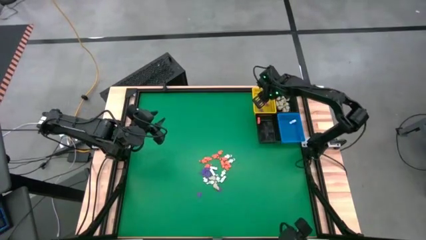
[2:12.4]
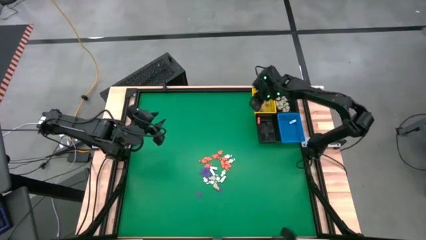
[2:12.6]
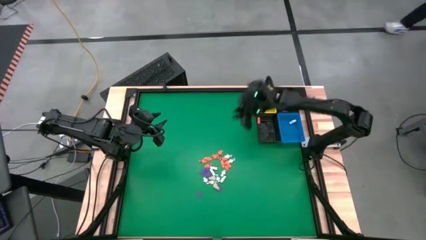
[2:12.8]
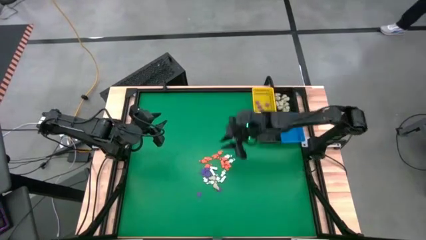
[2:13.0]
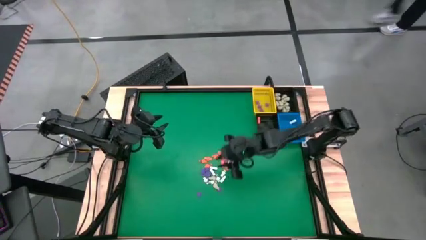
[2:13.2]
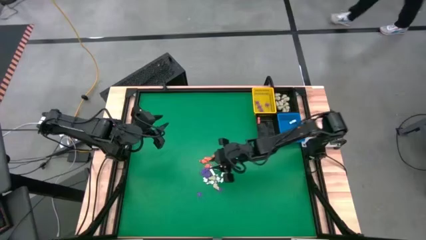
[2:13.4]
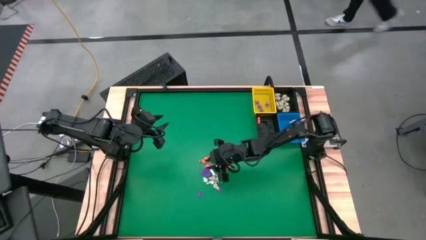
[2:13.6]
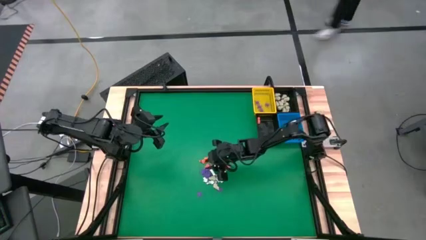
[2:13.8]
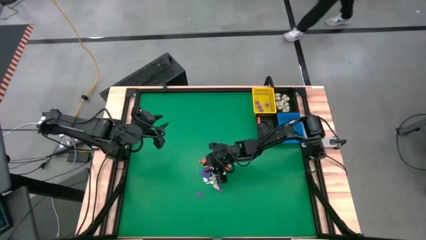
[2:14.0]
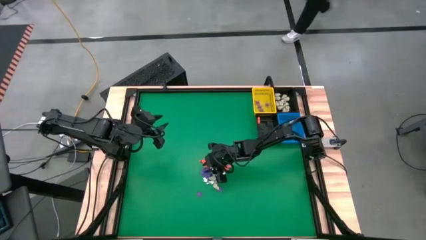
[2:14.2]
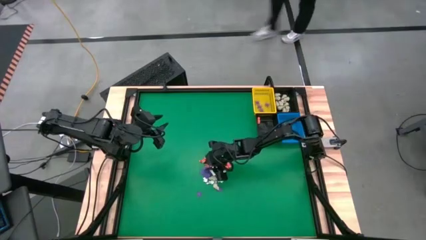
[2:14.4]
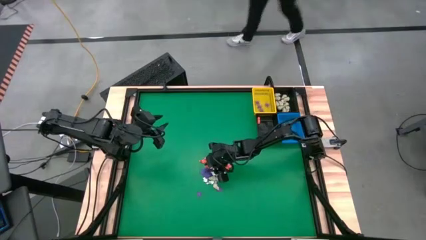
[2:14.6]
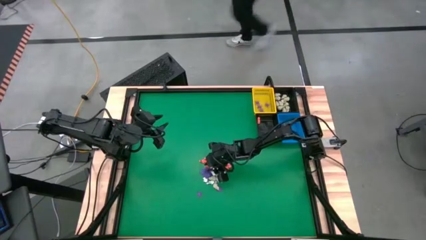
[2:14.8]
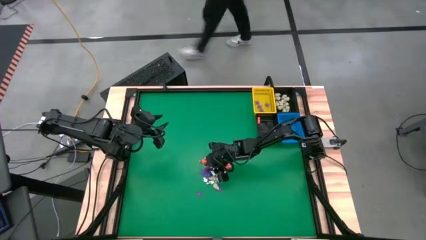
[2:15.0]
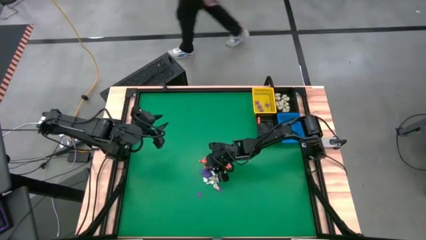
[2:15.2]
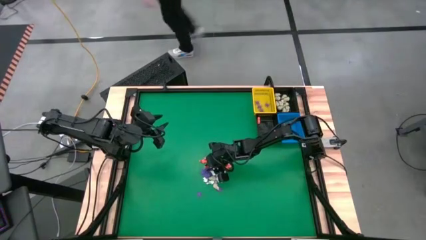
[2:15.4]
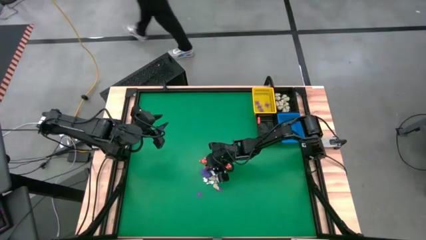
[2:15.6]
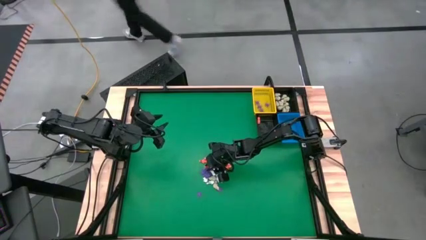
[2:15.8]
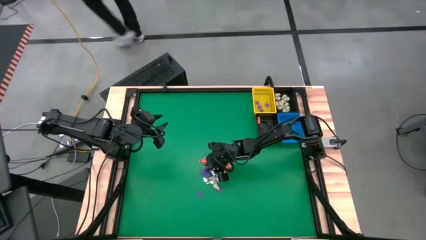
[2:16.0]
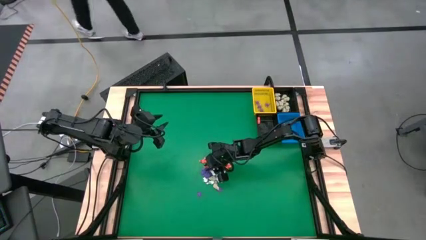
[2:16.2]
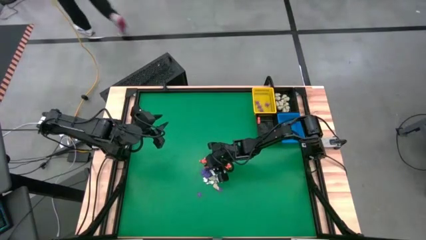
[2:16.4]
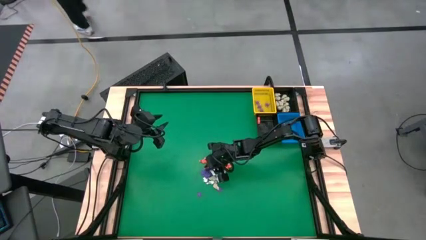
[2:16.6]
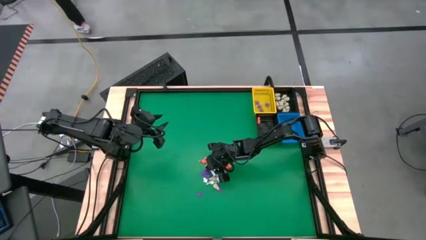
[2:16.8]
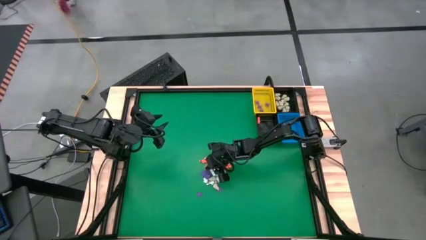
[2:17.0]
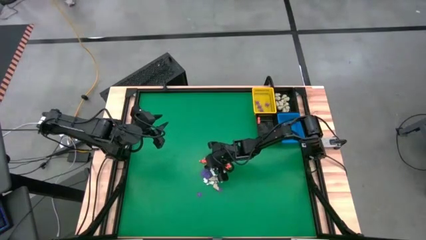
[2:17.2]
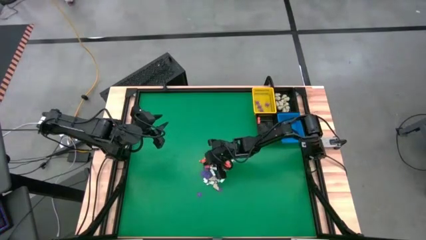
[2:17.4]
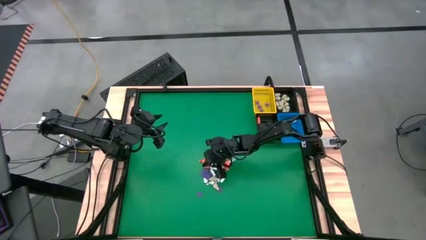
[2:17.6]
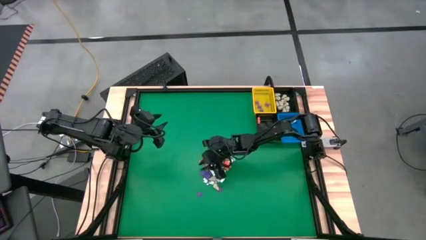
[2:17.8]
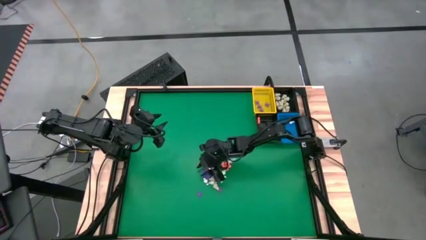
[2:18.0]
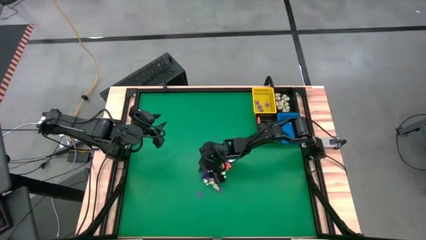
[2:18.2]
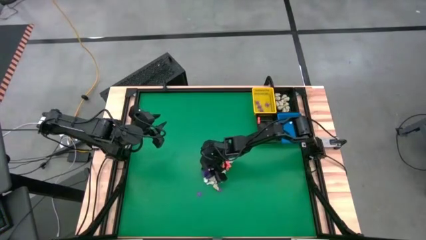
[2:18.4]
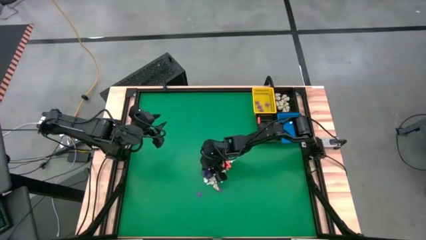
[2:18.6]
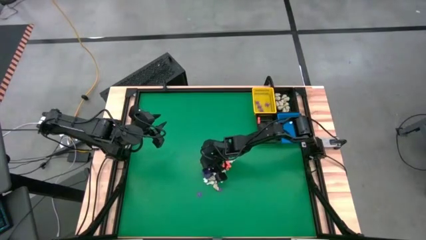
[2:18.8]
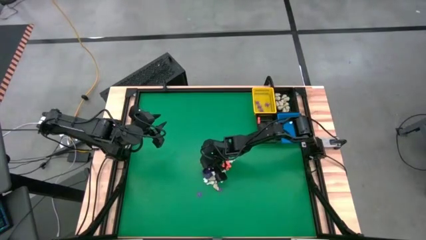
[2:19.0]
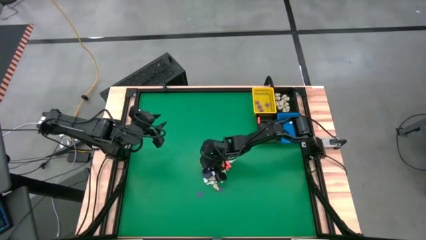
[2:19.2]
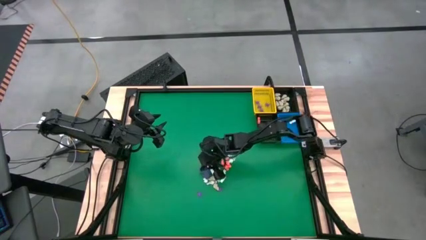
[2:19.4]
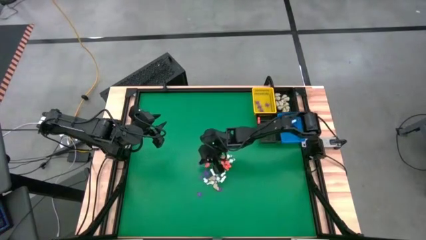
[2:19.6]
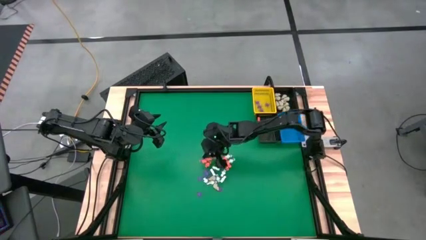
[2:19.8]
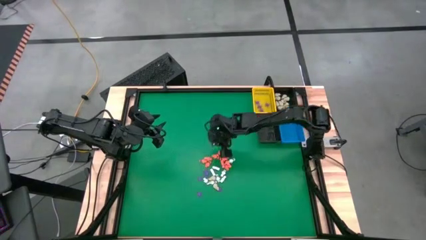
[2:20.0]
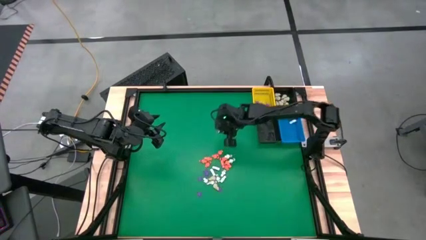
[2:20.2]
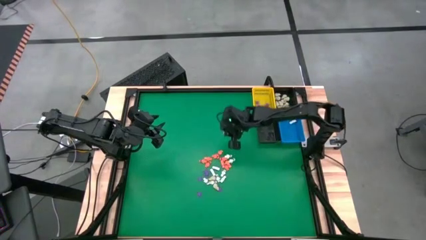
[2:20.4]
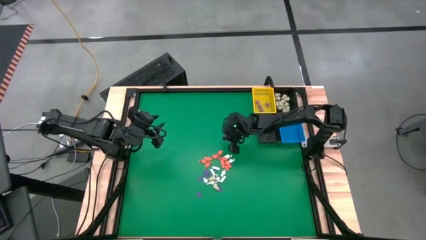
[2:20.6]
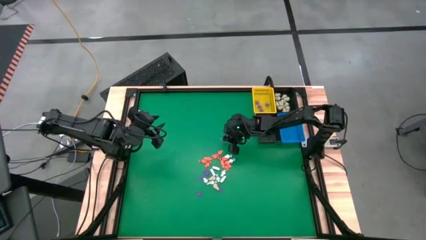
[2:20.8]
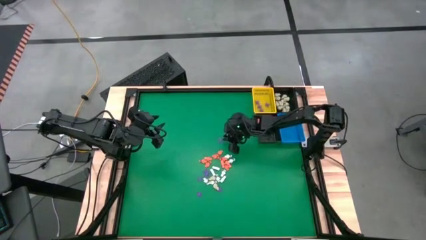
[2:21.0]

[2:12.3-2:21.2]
Task: Sort Halloween decoration
Put the purple spider toy into the yellow basket

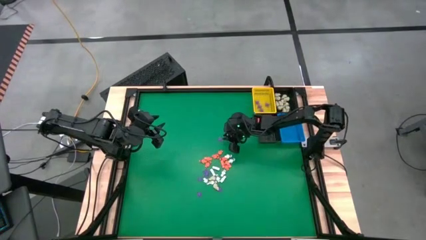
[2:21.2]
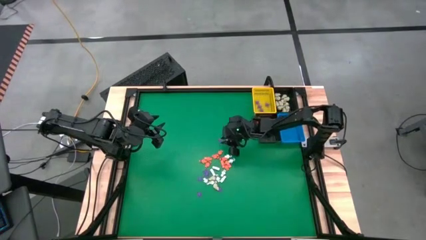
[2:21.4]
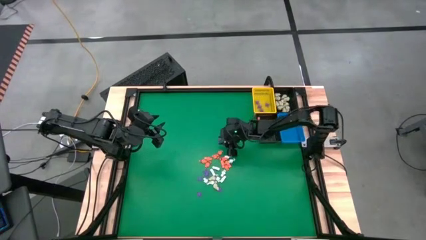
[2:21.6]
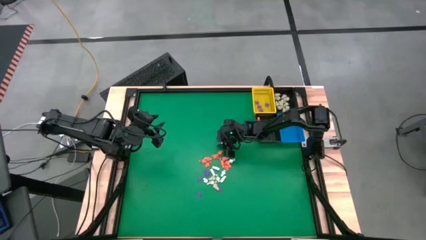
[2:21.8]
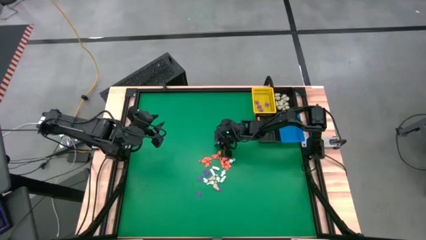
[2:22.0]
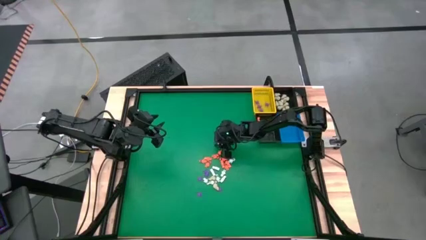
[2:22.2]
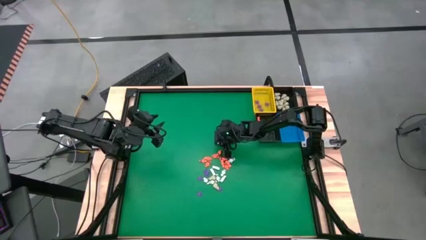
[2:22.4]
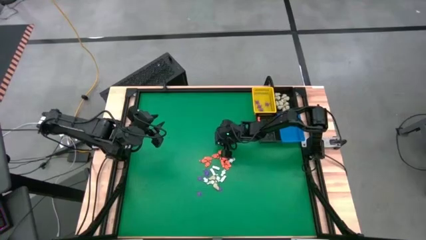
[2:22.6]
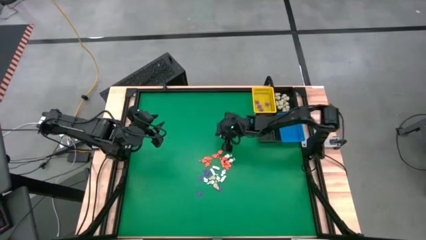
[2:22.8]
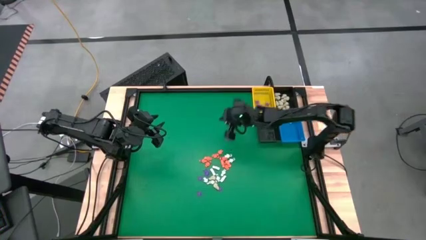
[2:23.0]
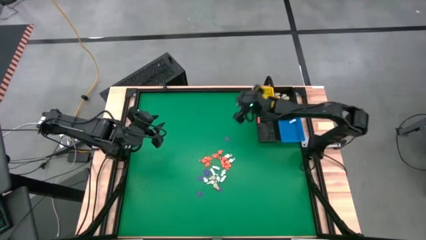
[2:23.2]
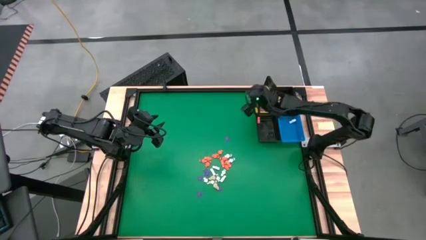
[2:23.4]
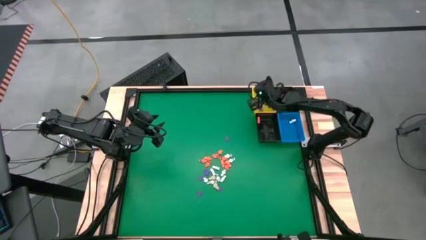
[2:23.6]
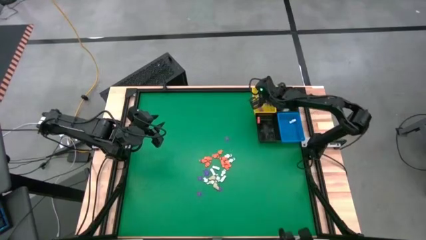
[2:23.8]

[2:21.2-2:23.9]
Put the purple spider toy into the yellow basket

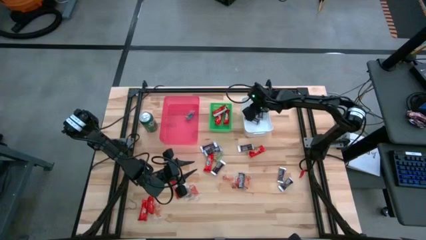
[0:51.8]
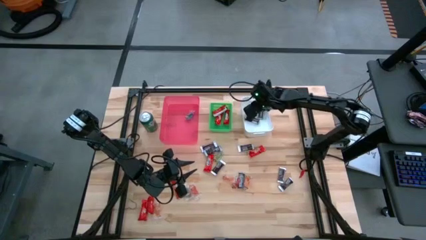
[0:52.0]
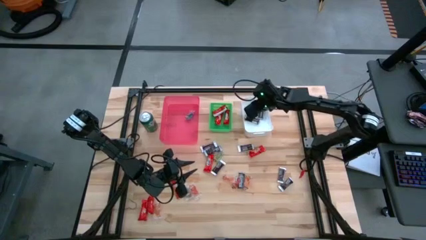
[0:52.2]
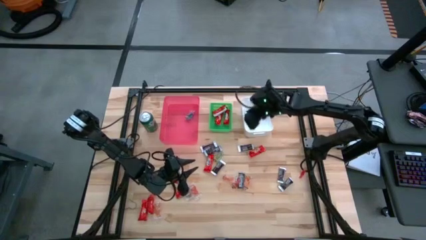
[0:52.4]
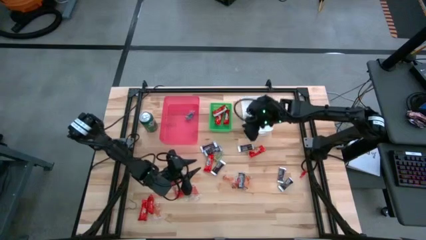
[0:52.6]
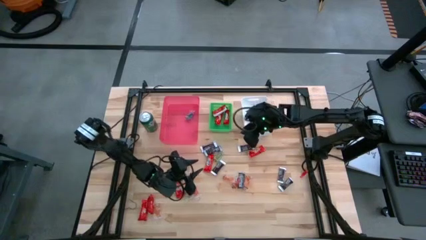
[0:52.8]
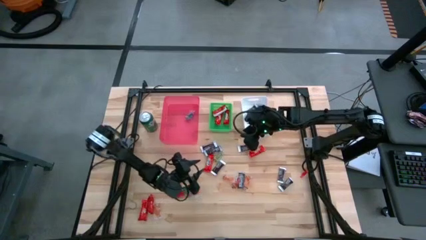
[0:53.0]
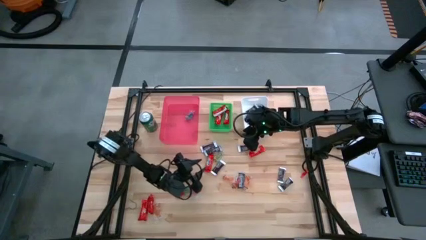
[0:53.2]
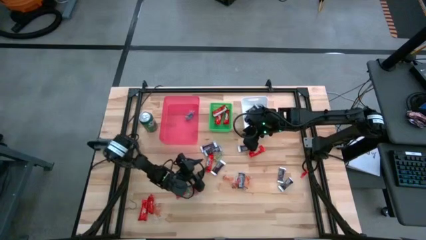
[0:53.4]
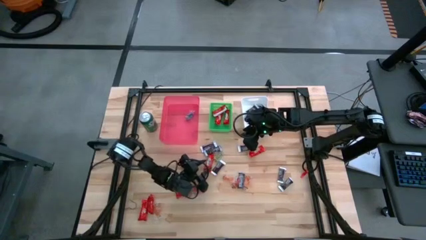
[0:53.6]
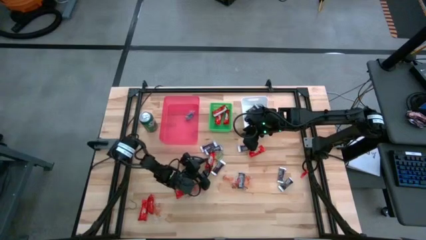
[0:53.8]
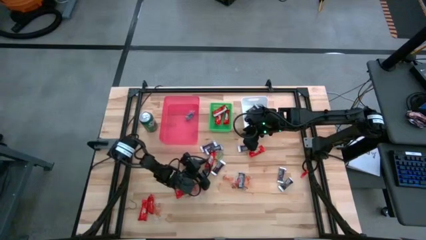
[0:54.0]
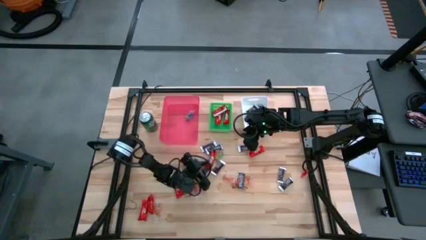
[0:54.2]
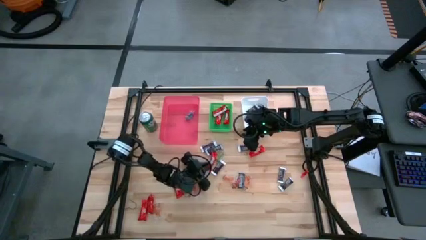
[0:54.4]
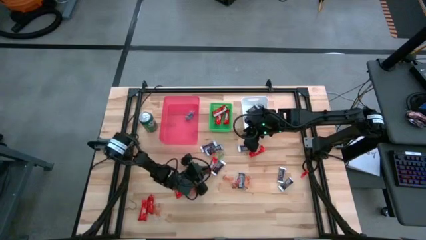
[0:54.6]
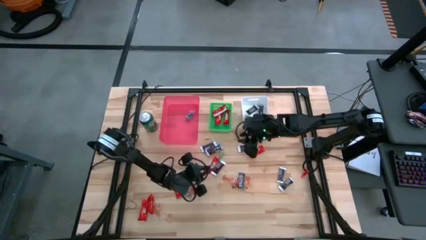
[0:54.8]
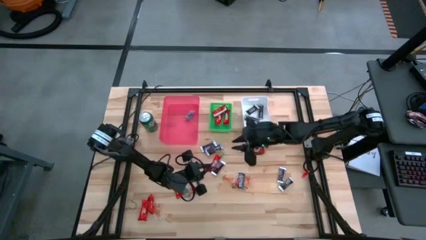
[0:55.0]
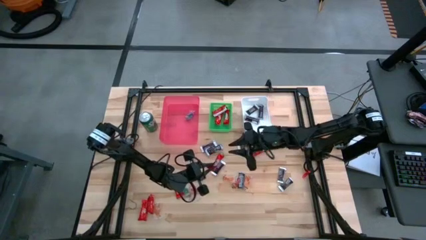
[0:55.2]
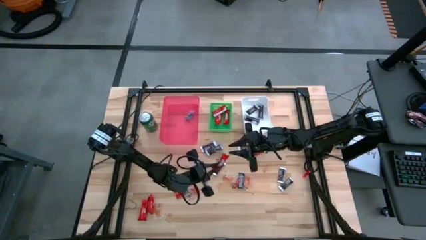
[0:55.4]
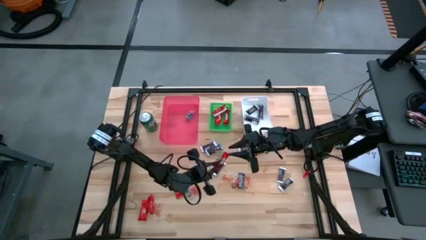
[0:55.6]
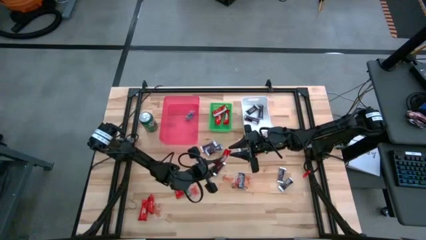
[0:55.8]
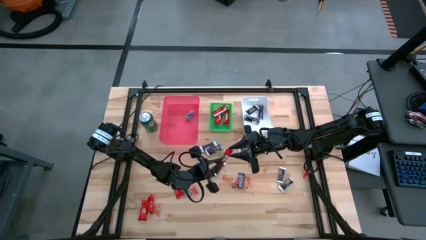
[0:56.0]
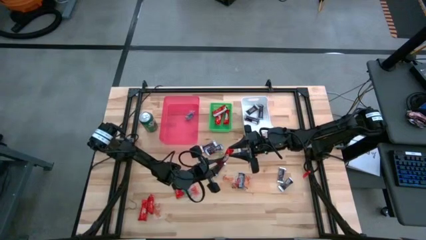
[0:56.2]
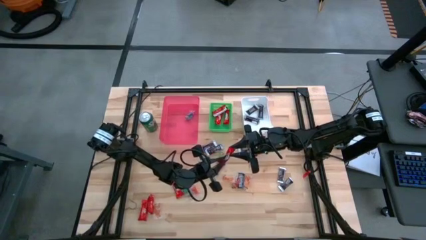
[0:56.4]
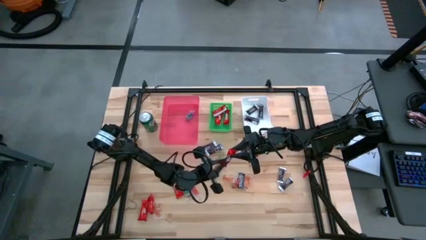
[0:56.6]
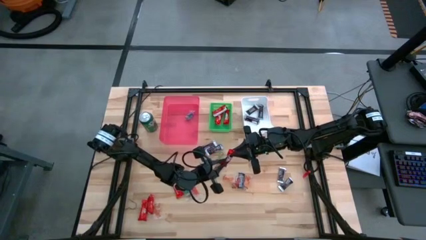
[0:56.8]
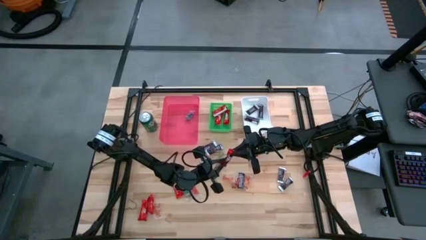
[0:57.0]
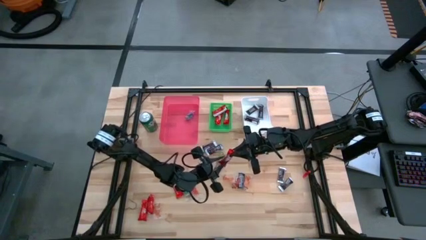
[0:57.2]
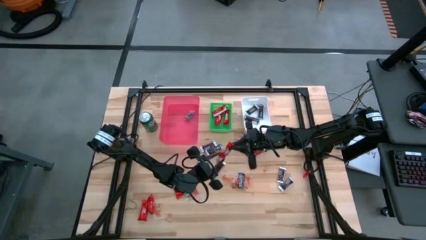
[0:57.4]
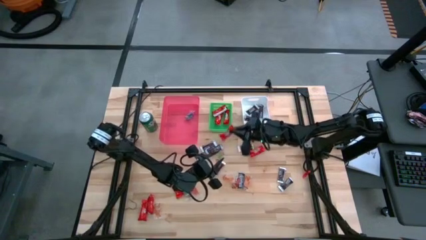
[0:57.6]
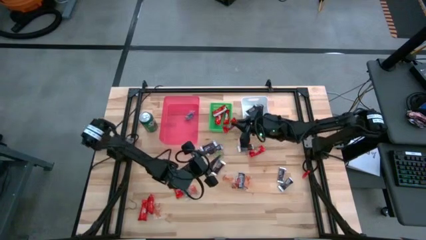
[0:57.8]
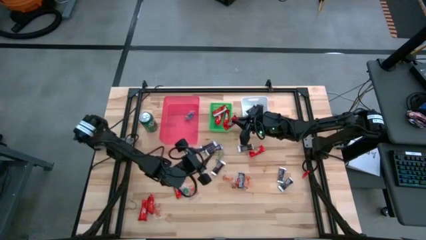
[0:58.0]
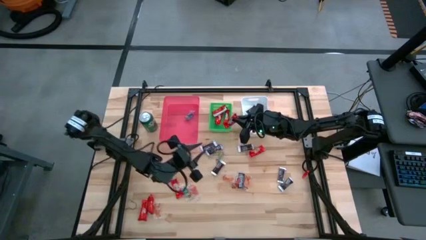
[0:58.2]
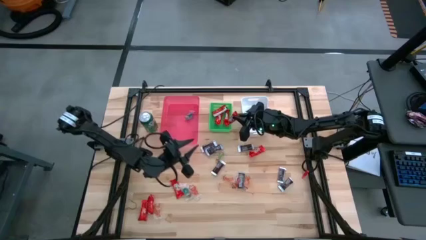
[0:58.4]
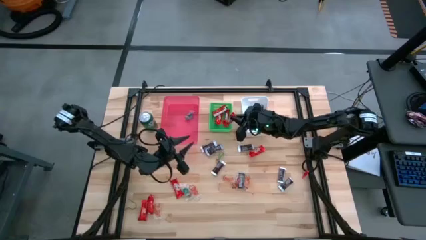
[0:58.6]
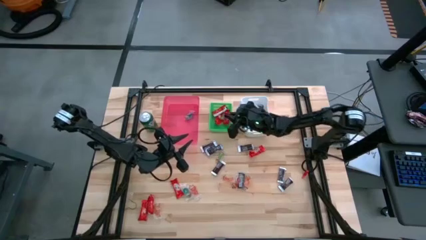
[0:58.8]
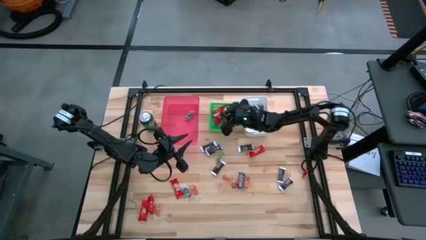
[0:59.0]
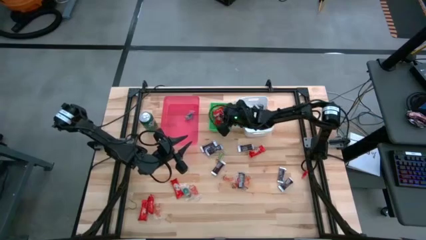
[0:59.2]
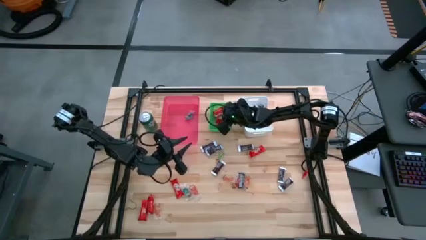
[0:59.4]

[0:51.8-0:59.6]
Task: Sort candy
Put the red chocolate into the green bin
